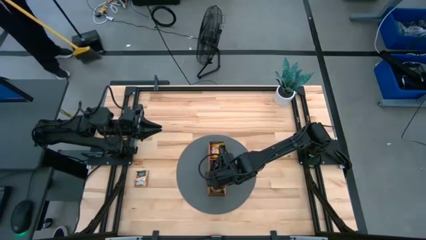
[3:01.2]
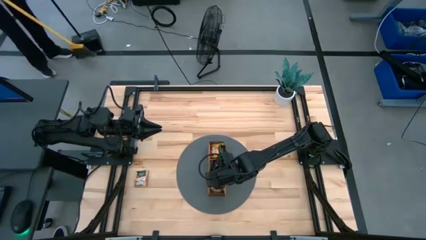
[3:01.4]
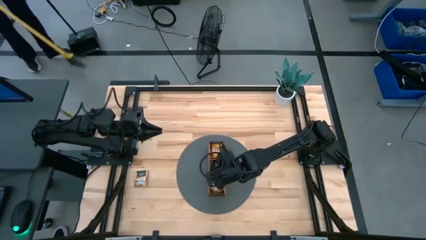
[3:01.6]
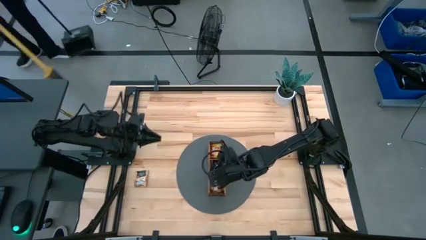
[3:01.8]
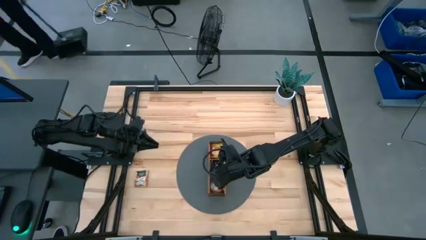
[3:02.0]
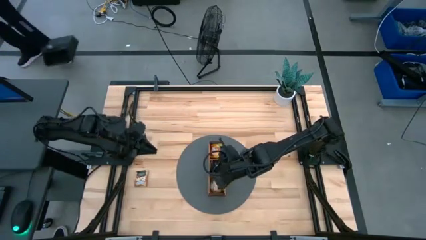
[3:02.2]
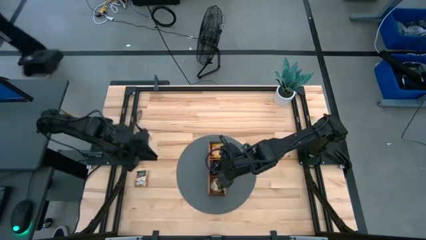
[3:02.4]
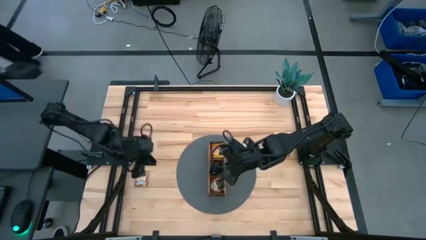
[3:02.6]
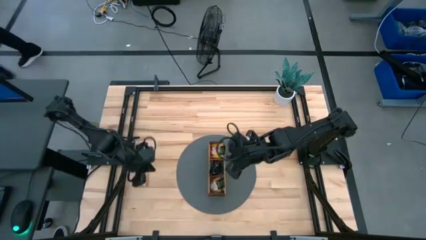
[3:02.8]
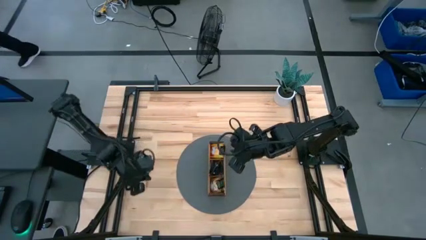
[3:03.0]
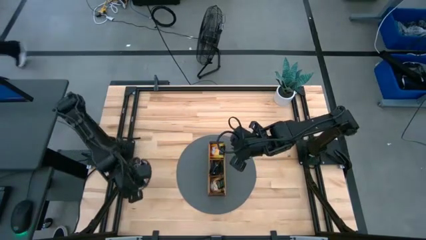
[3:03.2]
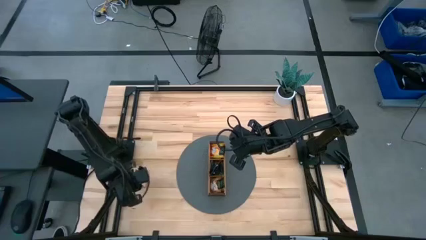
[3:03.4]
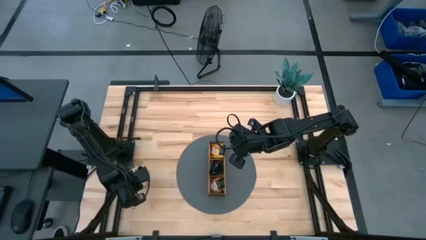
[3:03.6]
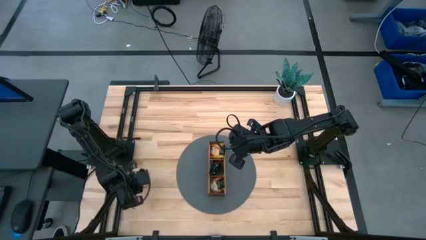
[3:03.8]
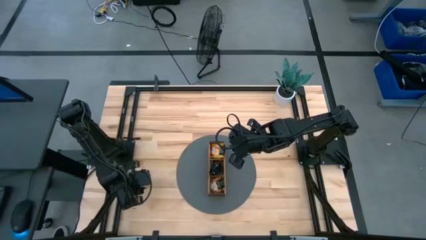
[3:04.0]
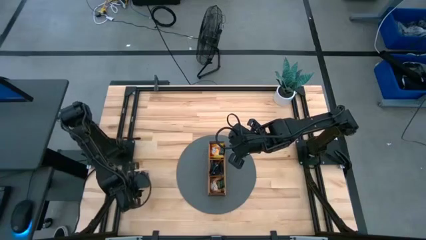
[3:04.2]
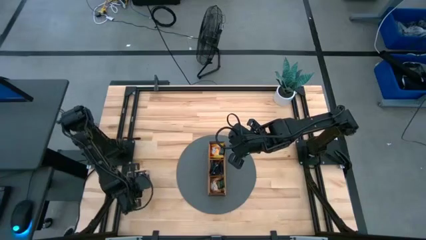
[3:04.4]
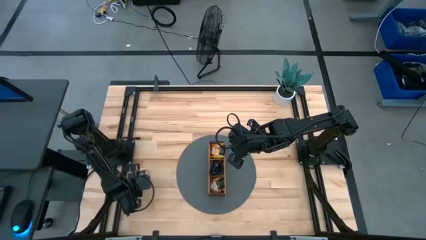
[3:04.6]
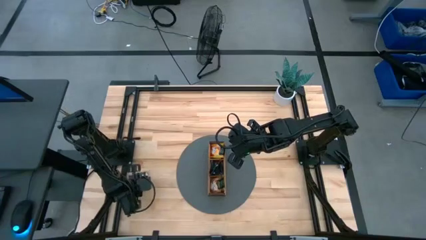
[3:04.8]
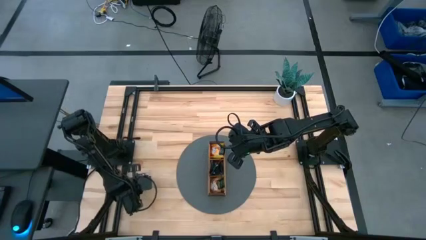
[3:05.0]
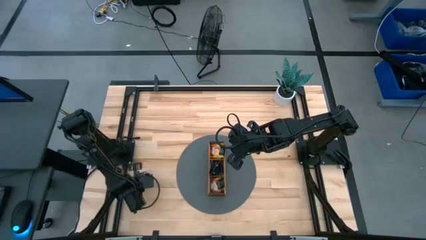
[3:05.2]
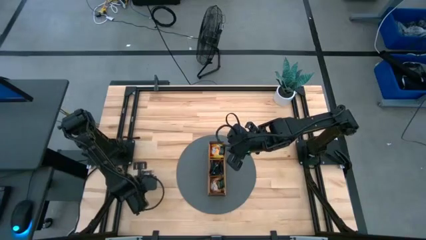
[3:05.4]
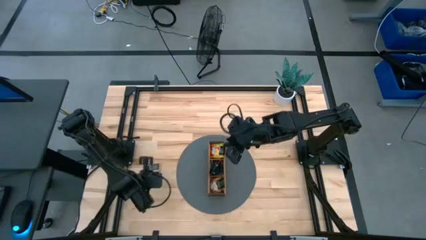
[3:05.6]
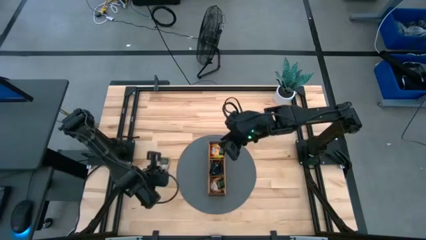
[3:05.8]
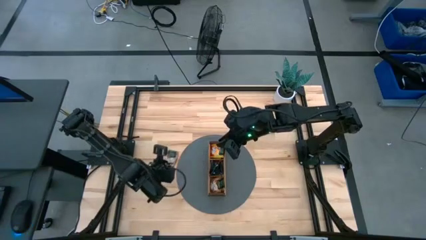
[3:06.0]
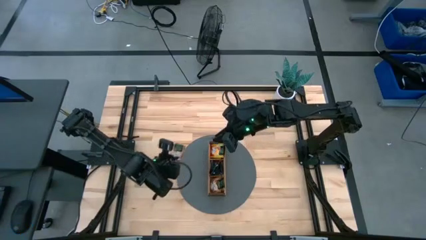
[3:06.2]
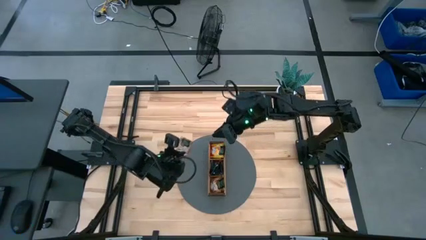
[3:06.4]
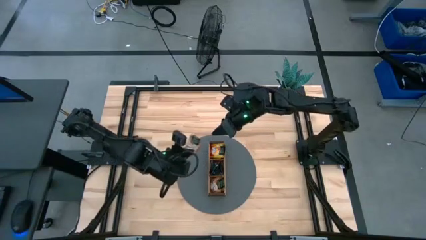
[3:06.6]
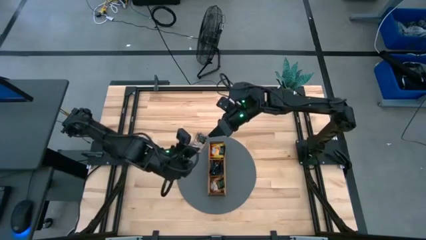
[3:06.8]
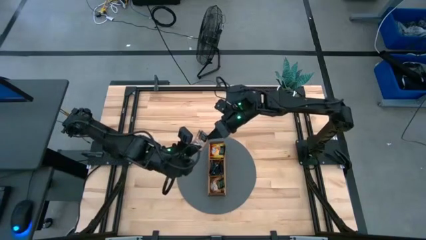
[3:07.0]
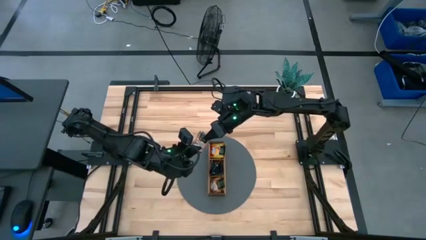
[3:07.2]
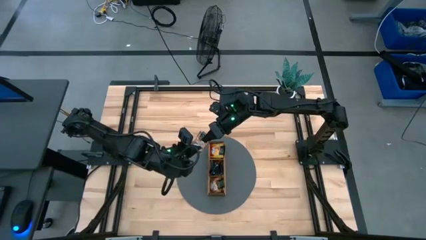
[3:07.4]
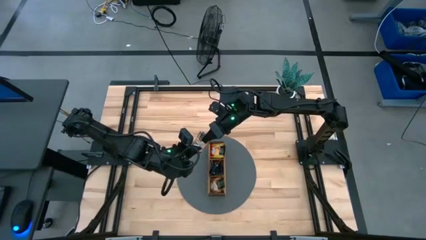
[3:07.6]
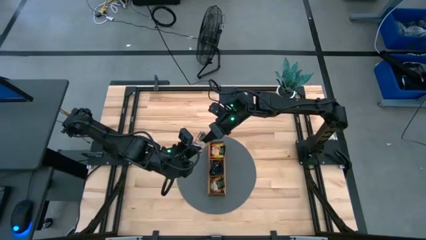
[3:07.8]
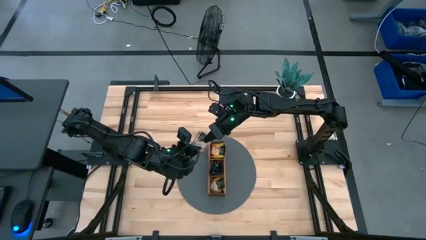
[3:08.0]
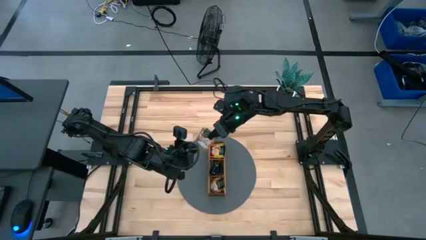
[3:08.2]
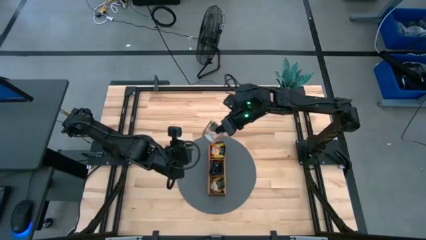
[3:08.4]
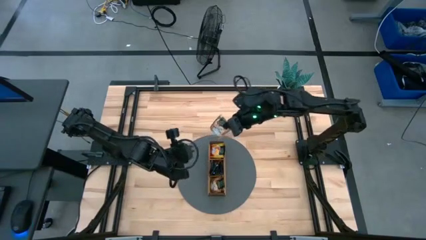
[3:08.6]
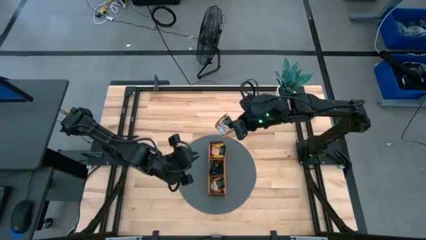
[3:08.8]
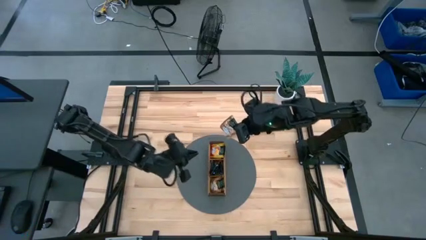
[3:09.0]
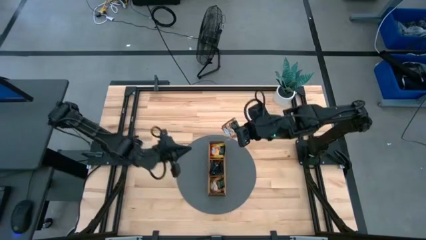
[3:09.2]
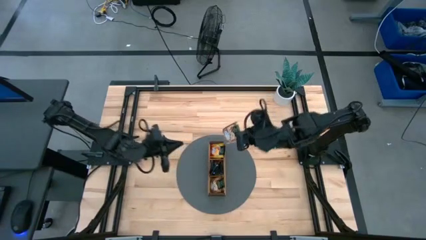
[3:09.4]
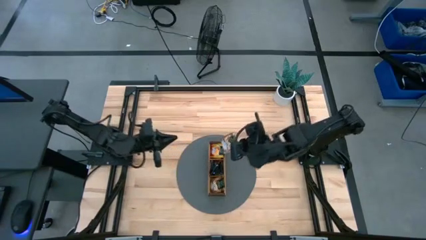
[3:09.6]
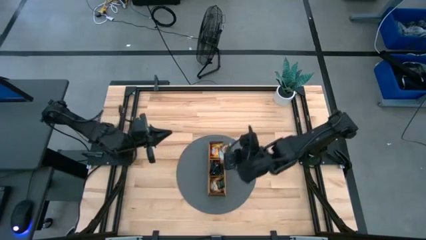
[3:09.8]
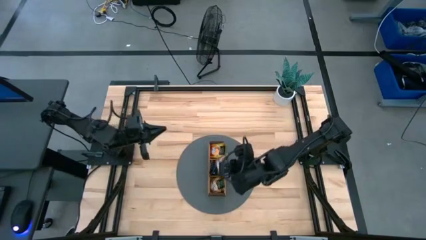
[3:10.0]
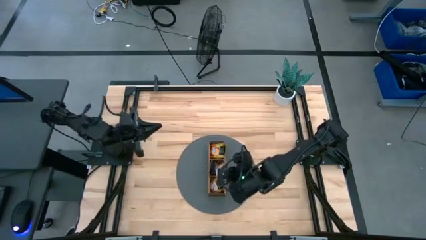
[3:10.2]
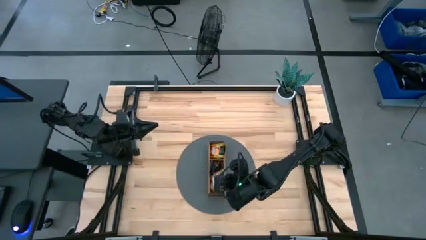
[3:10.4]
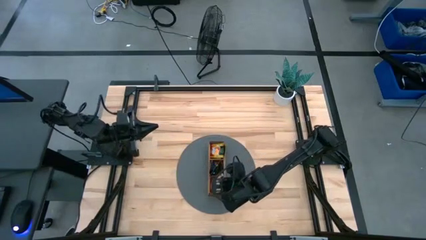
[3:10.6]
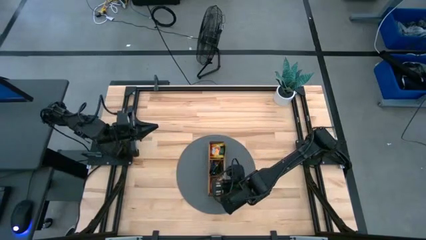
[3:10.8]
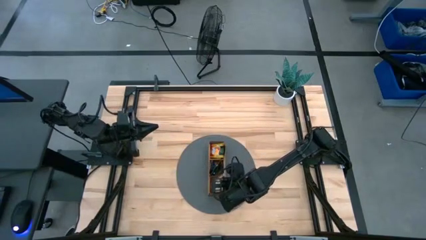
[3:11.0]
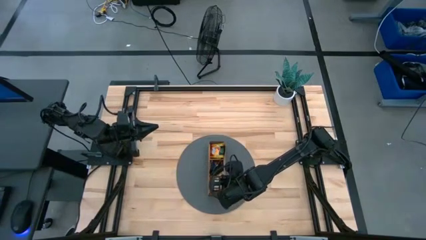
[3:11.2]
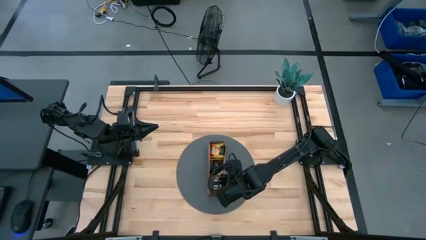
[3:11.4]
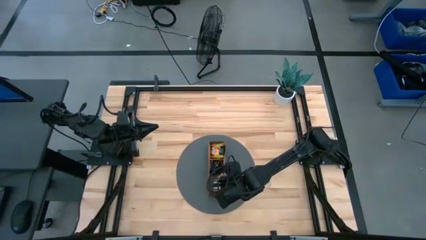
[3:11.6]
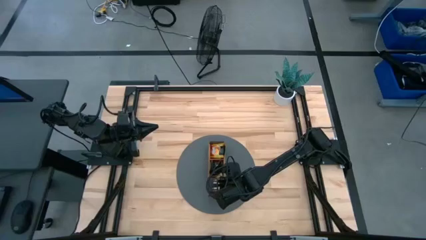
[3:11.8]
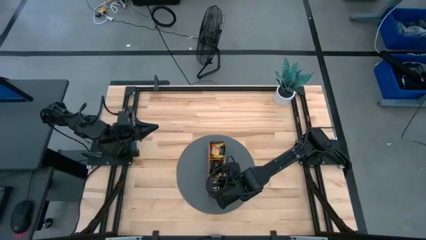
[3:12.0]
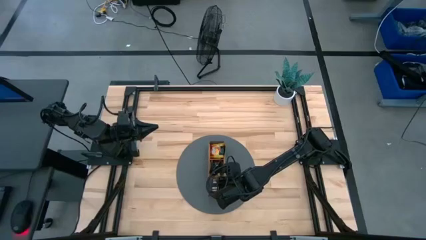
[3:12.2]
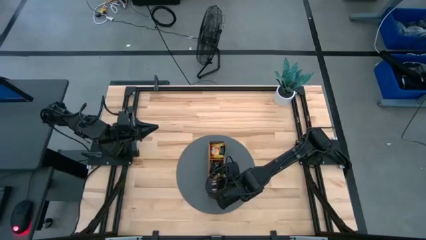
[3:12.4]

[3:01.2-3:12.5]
Task: Pick & Place Tea
Put the brown tea bag into the bottom section of the wooden organizer

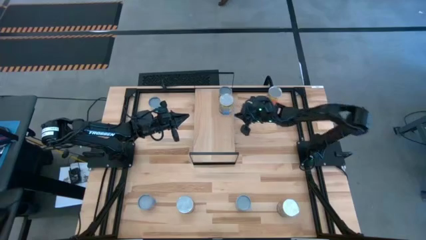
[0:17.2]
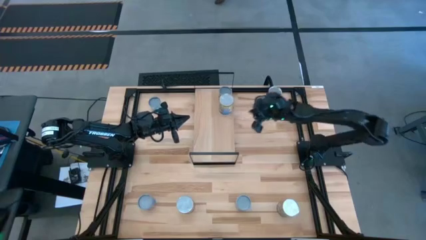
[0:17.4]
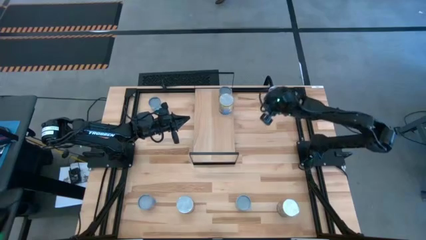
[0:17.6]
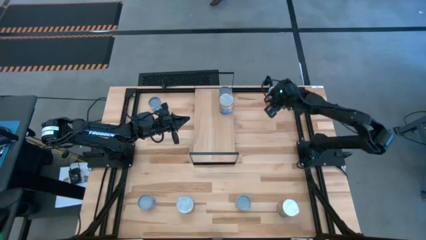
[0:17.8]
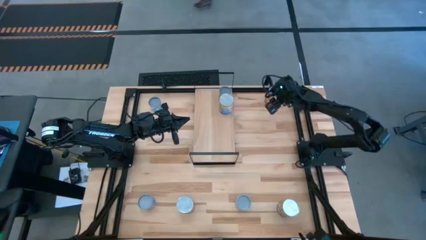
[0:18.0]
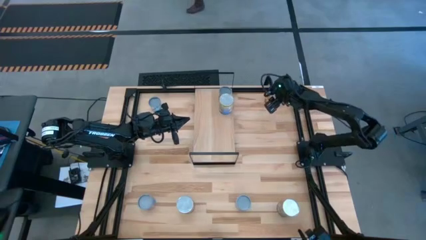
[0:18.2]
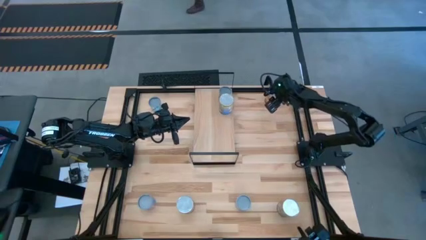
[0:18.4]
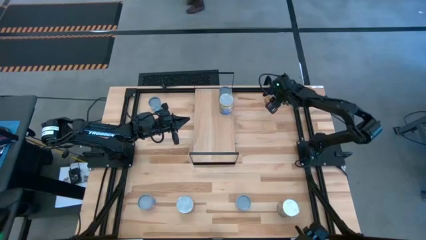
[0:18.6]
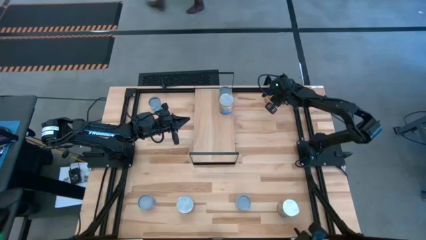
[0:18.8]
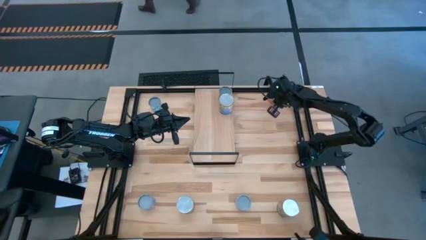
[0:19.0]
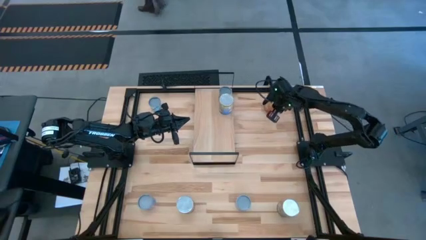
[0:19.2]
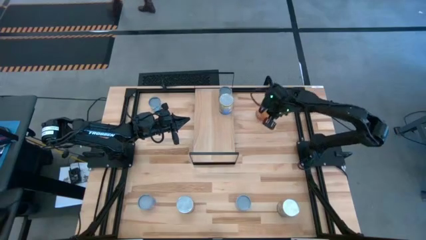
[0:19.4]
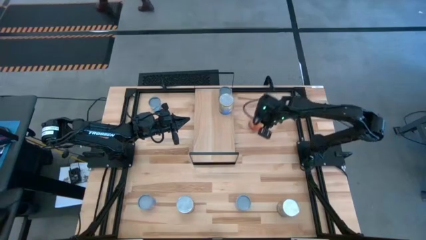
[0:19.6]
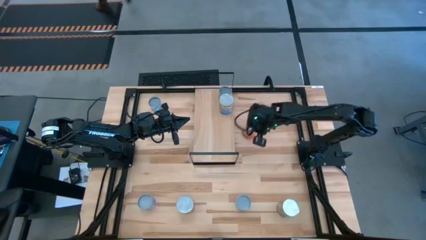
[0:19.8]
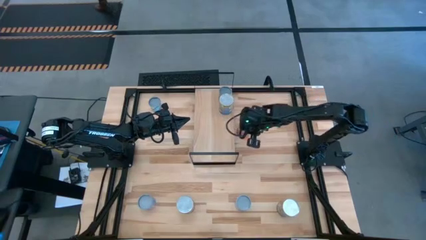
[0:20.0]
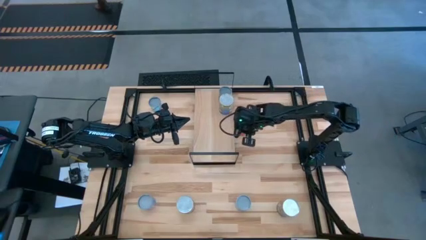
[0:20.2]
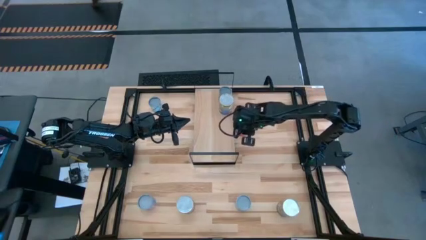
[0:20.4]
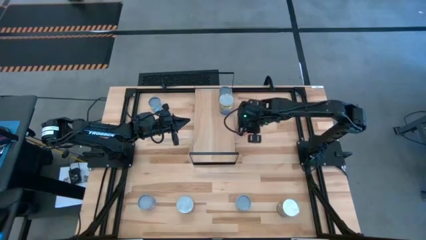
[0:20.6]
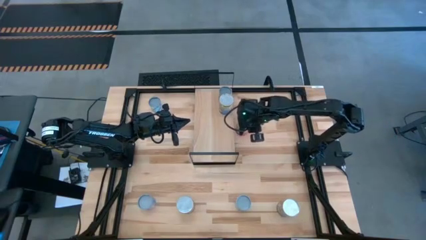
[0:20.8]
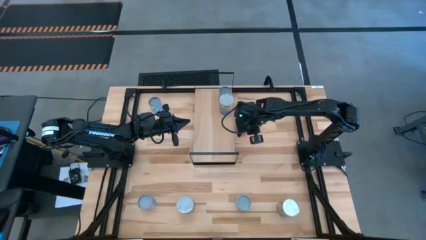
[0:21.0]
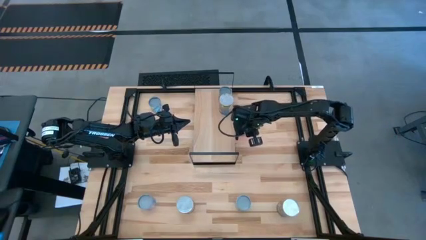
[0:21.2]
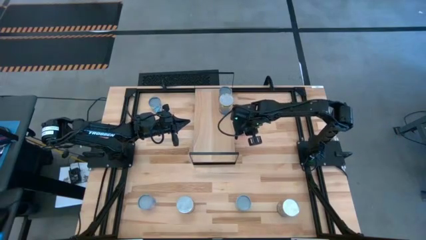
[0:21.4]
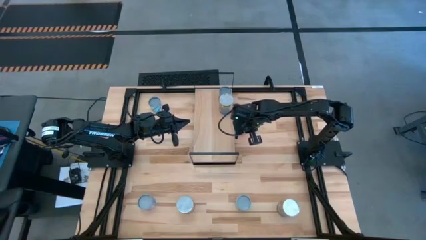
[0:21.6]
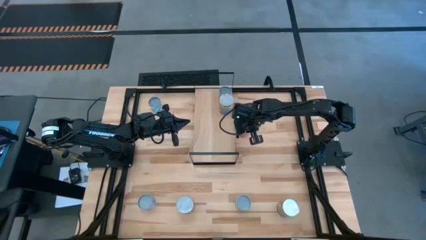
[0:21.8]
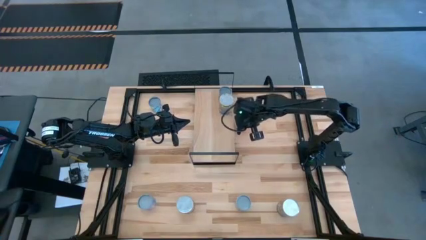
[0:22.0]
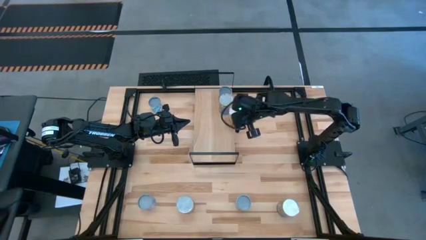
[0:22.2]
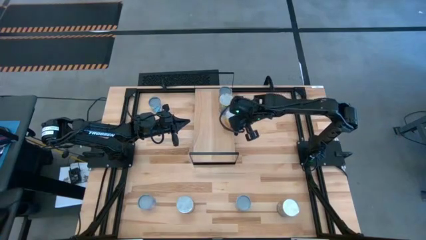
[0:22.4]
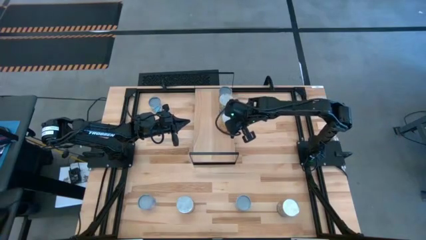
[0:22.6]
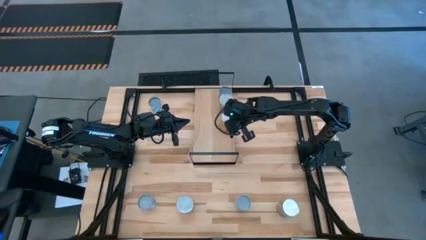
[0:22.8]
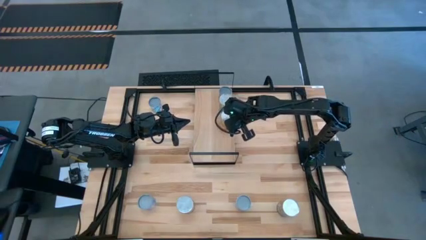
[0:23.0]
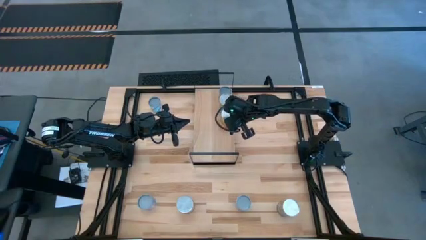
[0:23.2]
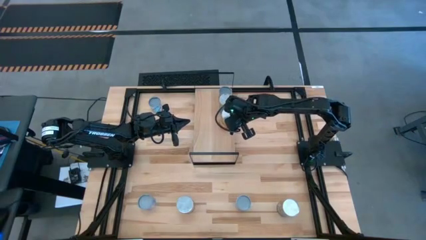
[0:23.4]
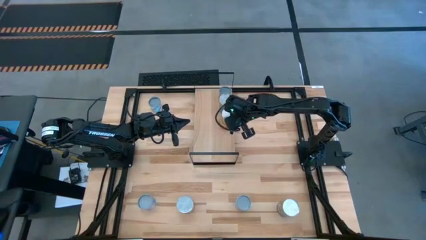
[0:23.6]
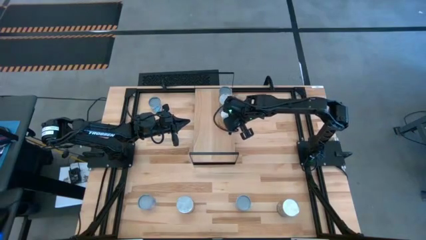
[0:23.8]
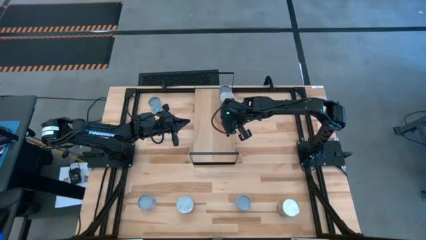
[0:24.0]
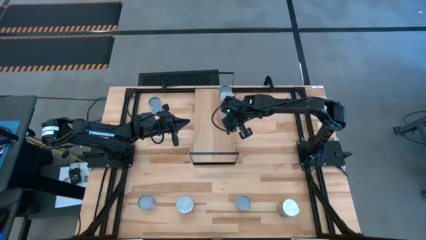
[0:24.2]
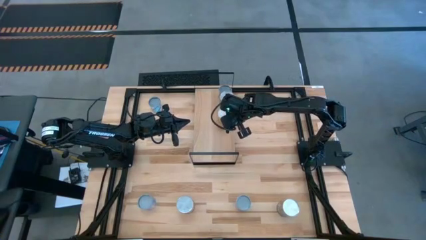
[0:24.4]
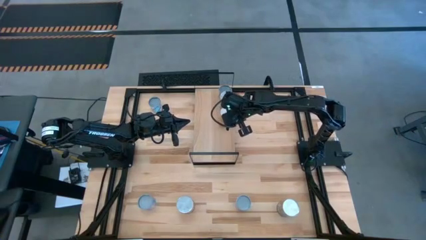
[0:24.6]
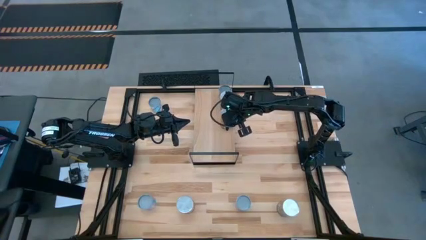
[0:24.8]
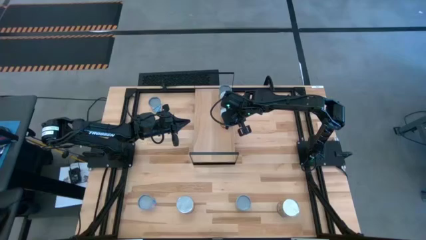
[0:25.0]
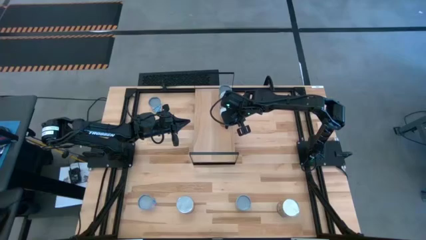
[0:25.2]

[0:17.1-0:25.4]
Task: Pick and place cans onto a shelf
Put the right large orange can on the shelf
